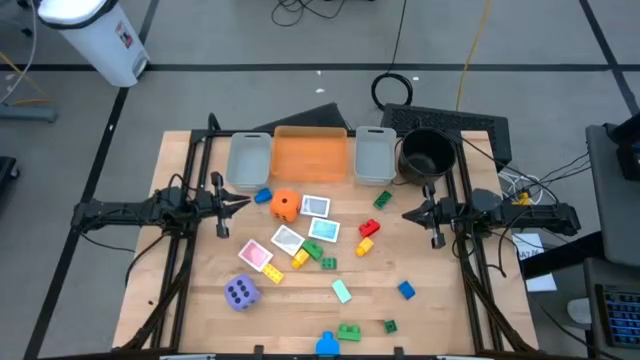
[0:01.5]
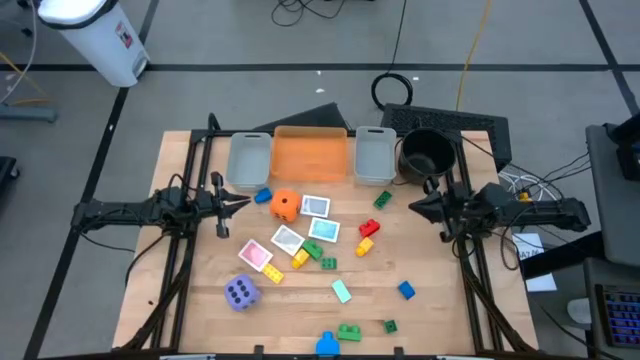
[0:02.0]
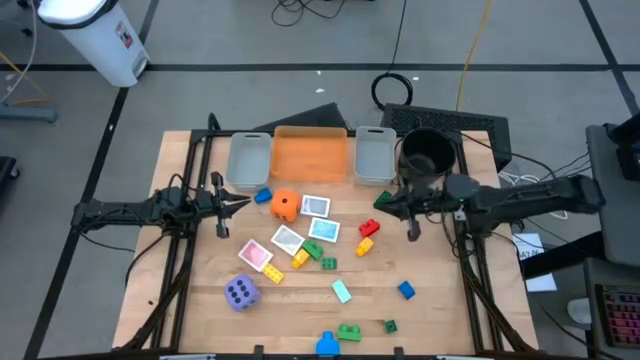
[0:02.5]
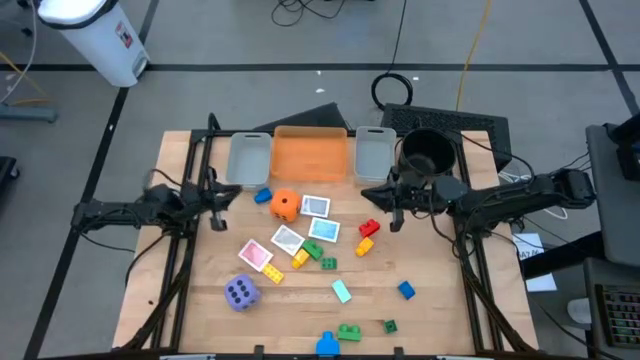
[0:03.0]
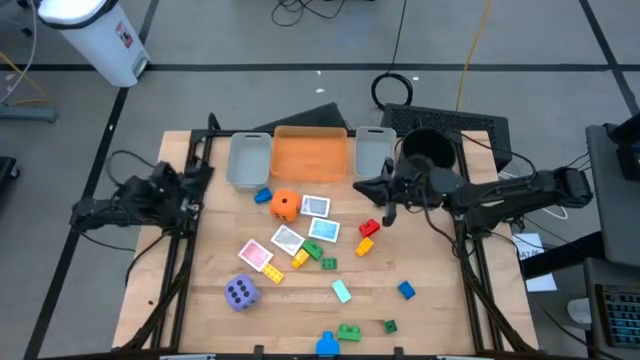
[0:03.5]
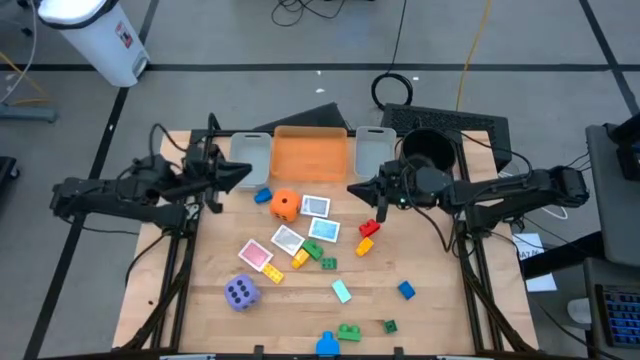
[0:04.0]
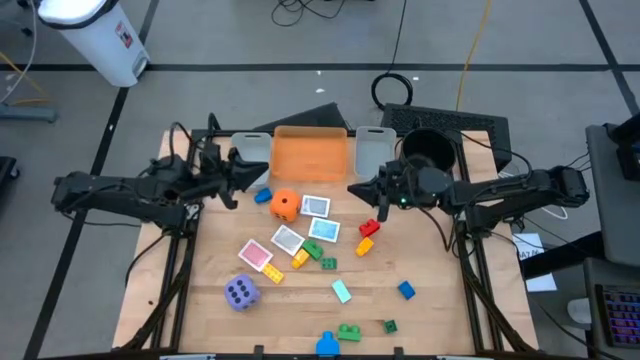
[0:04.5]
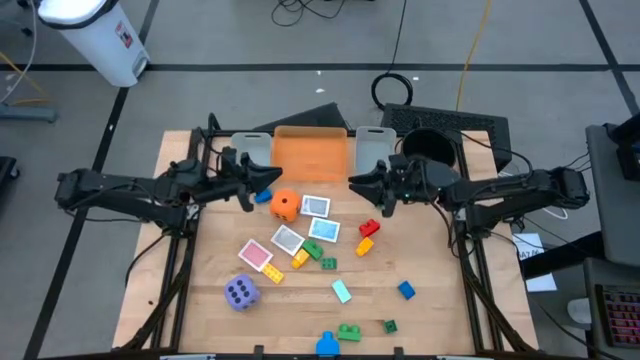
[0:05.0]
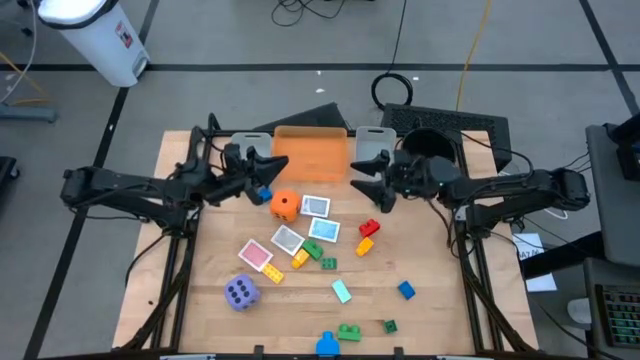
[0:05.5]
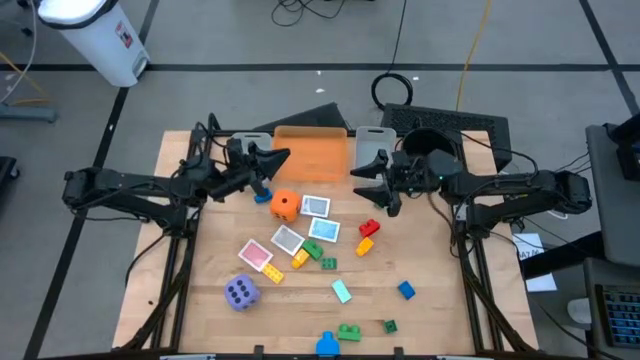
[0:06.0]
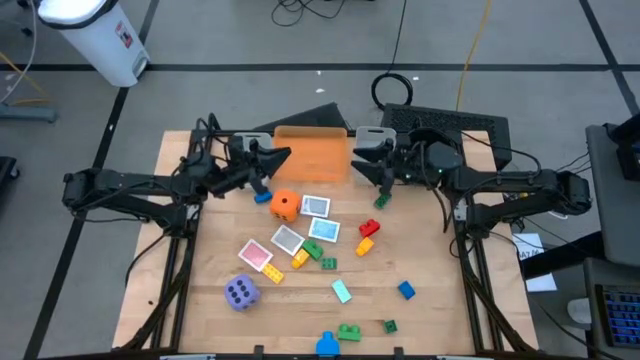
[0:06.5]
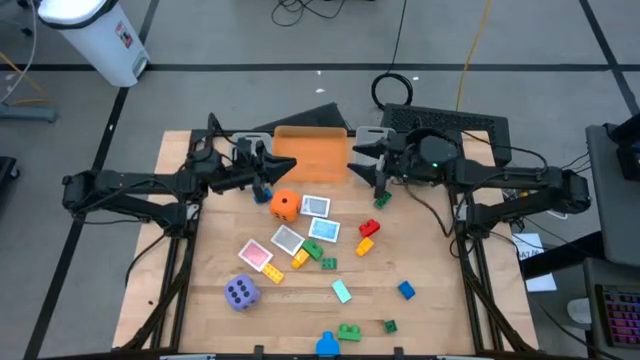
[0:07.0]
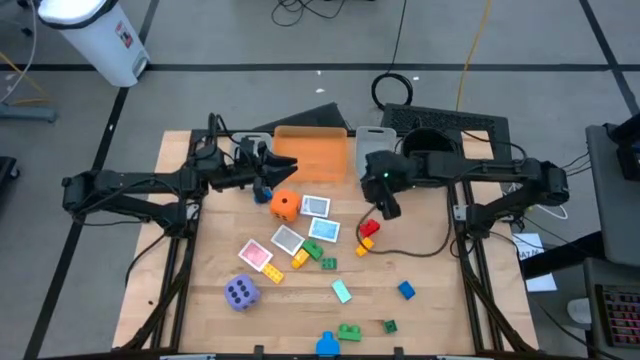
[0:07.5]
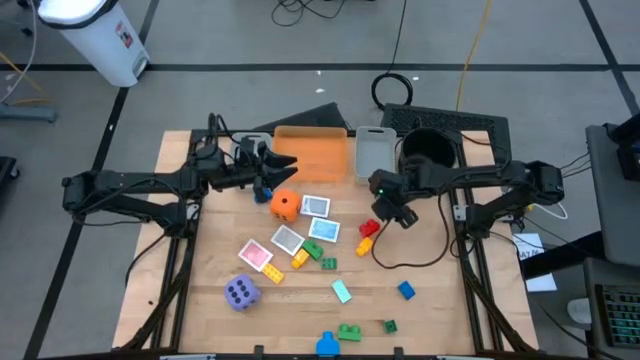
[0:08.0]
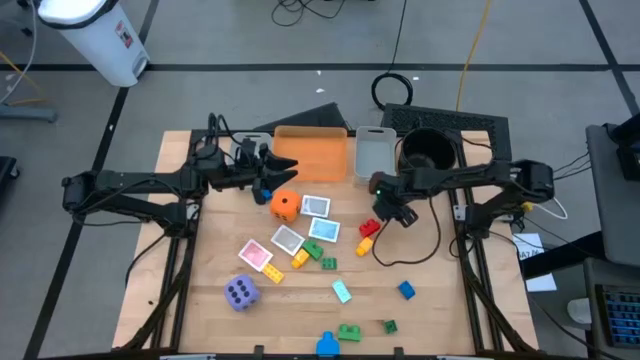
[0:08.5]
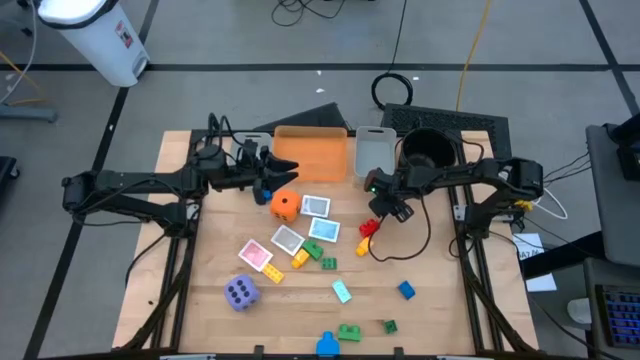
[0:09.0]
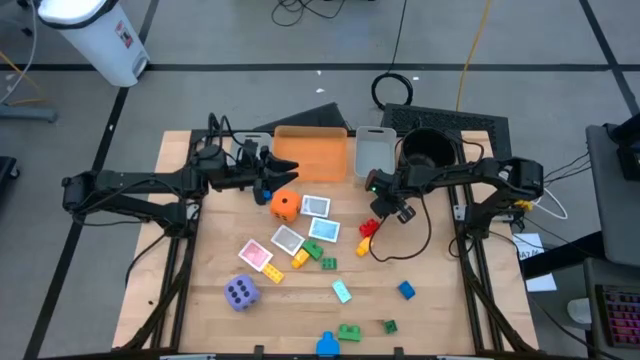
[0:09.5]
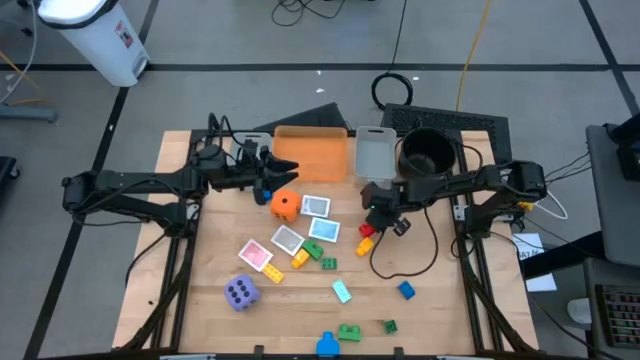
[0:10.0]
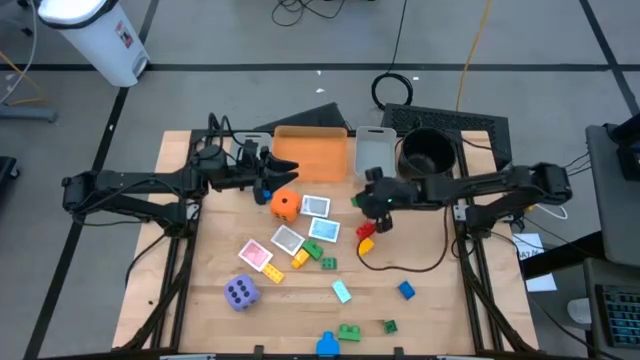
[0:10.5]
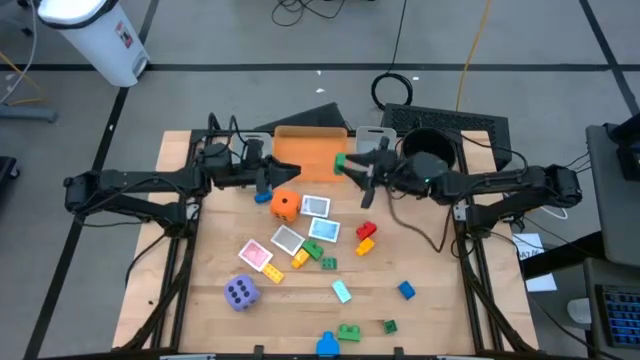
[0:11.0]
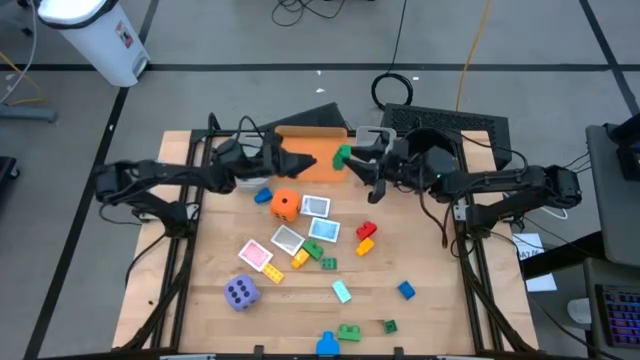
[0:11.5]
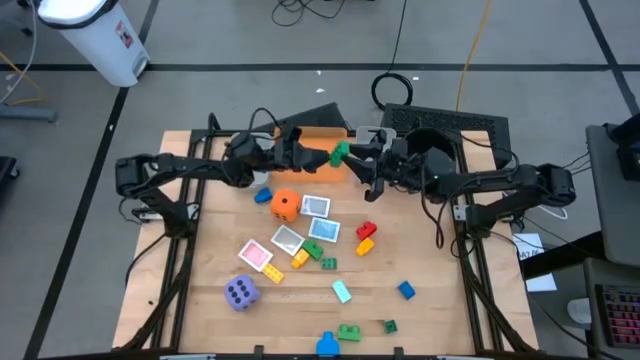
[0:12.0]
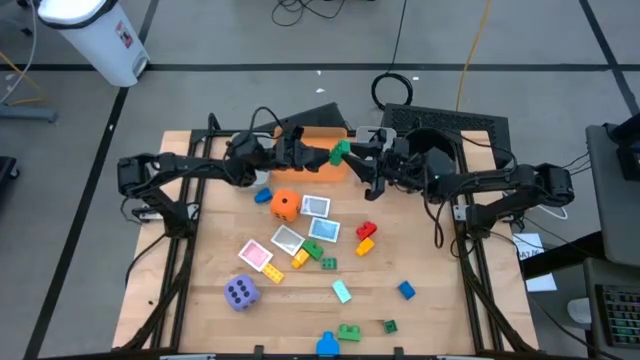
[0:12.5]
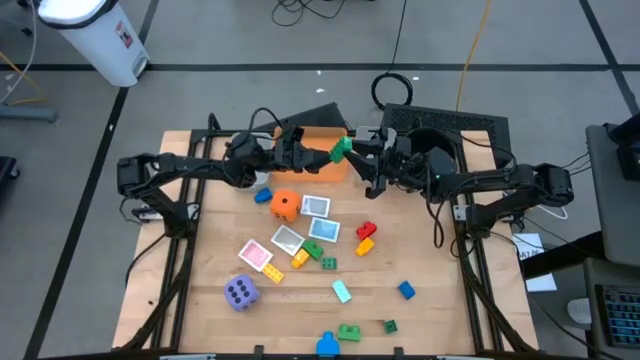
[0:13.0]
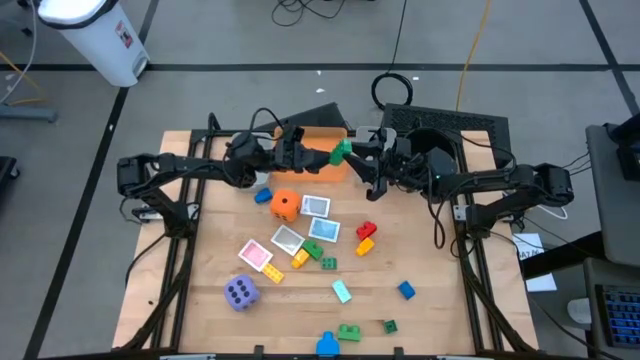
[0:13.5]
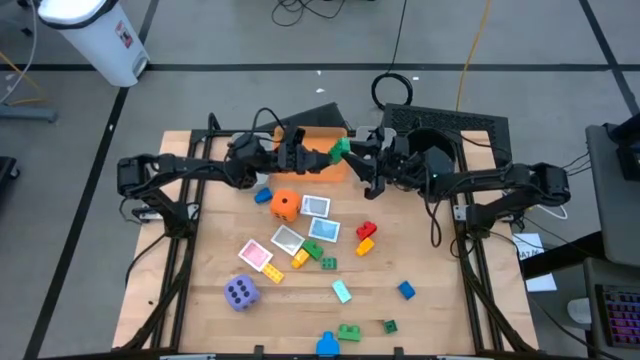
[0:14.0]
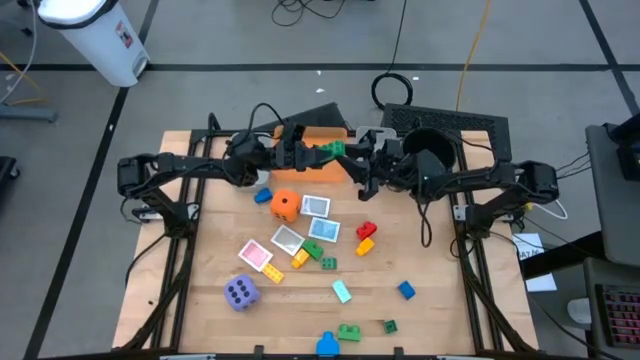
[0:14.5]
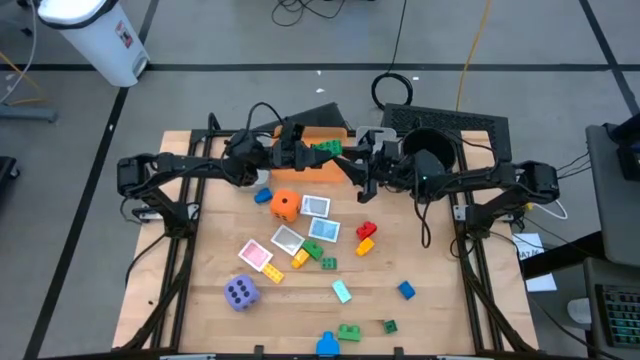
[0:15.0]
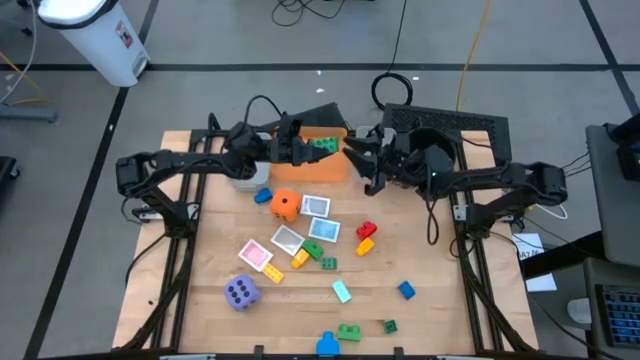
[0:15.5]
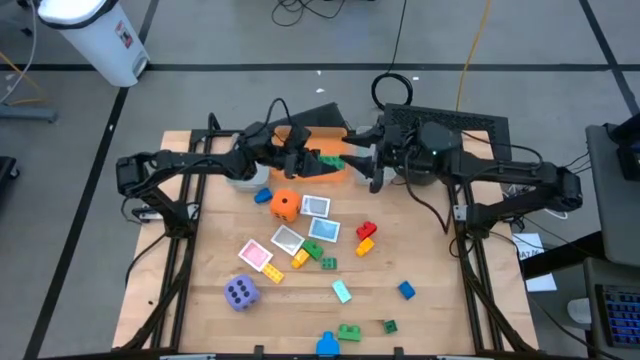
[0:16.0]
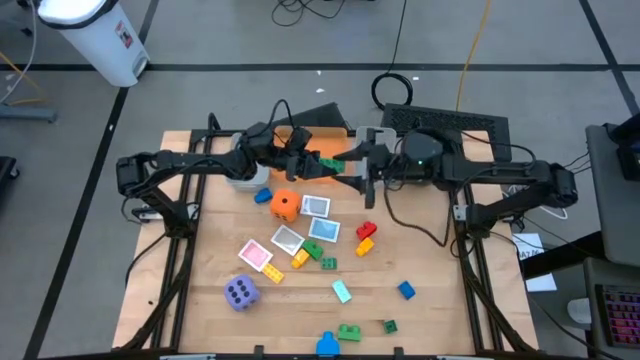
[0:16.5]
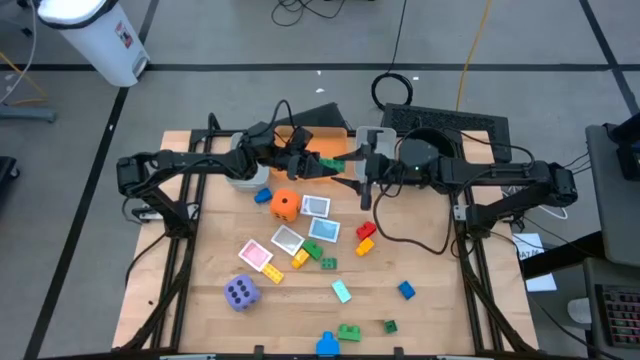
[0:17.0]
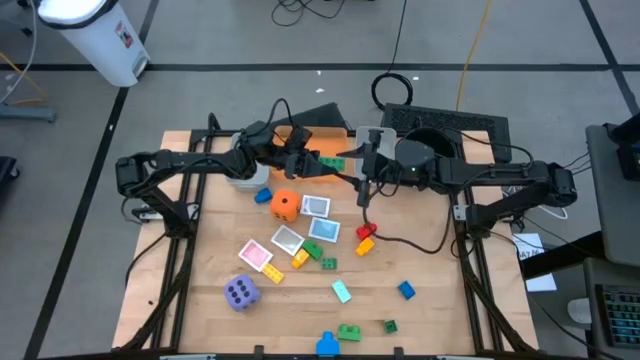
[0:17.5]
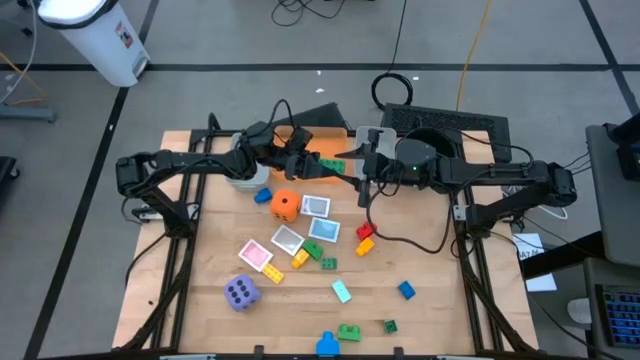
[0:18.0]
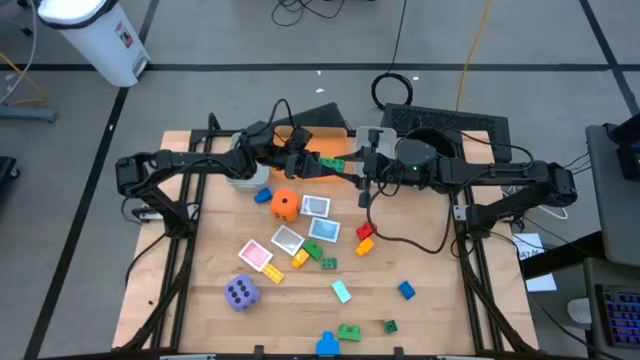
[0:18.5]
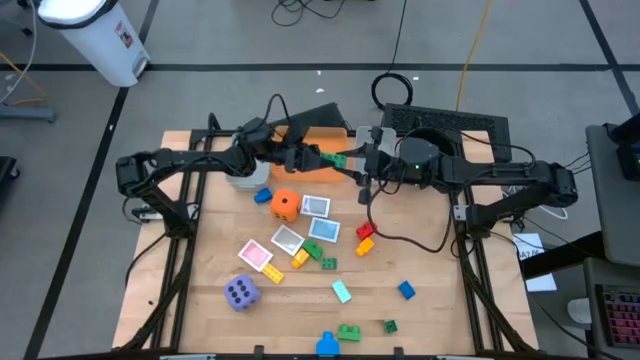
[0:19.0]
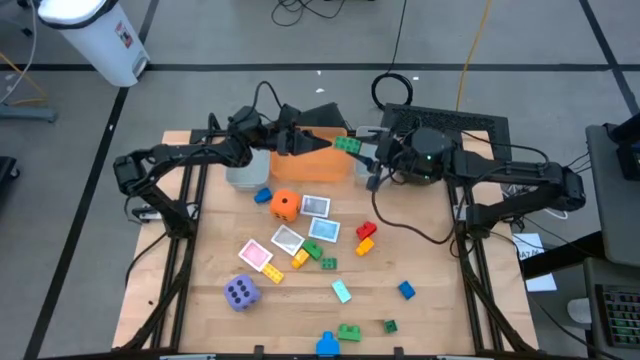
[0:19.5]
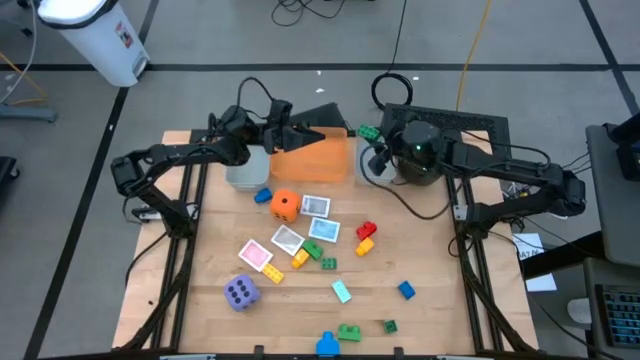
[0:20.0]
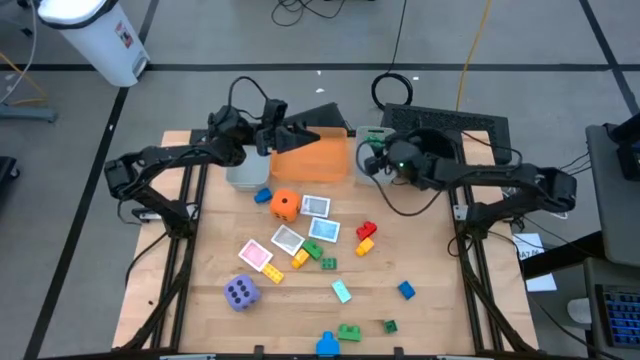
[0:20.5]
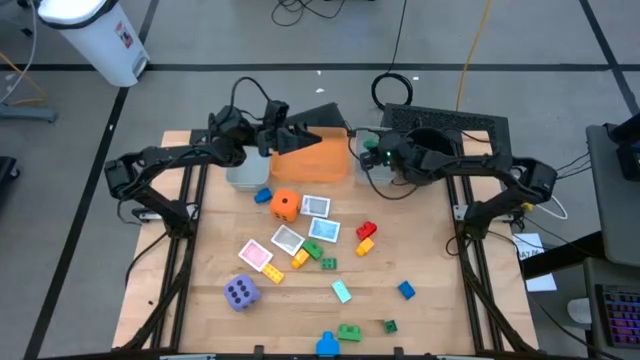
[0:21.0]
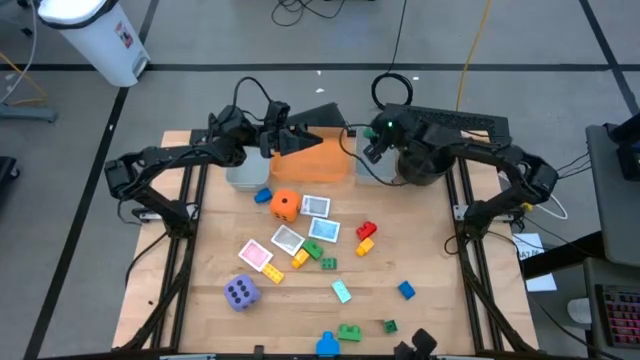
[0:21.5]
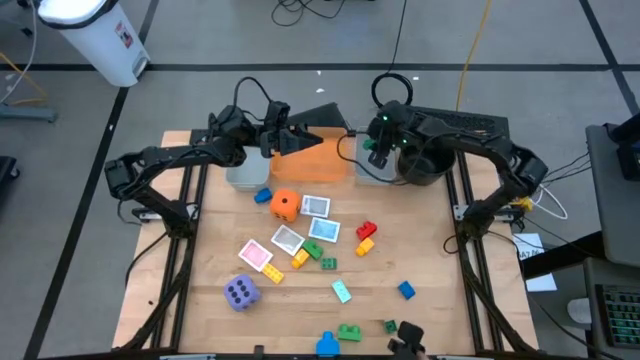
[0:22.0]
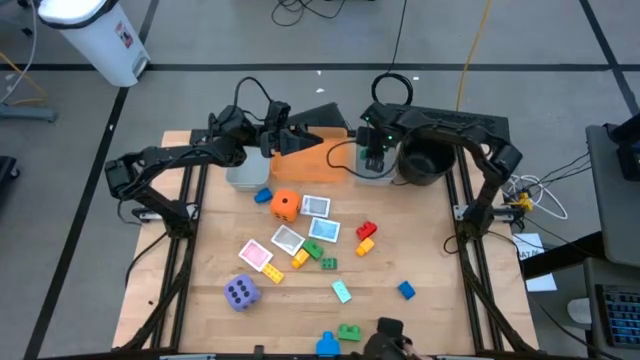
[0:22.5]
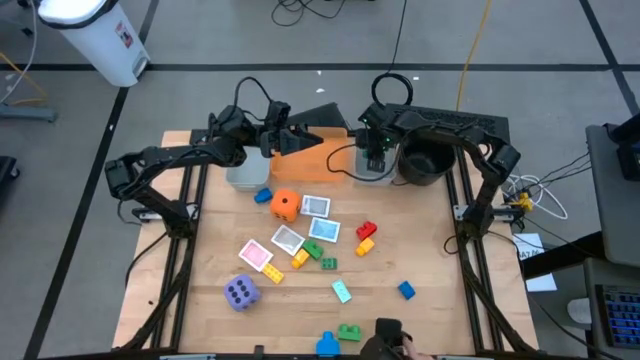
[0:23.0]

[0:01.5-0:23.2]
Task: Pick & Place Toys
Put the green game piece into the right gray bin
